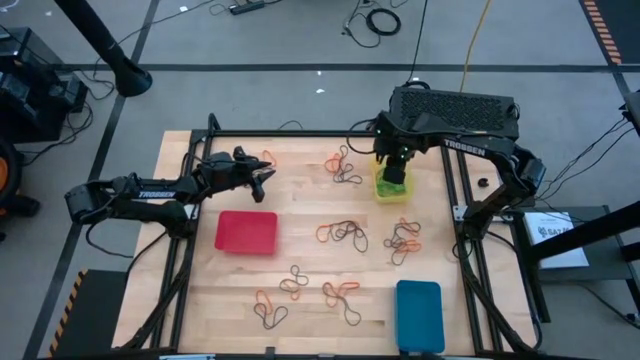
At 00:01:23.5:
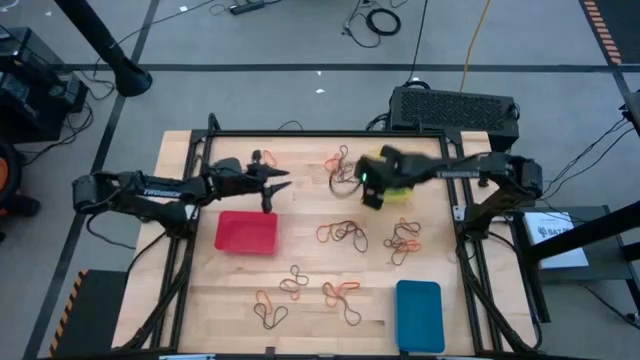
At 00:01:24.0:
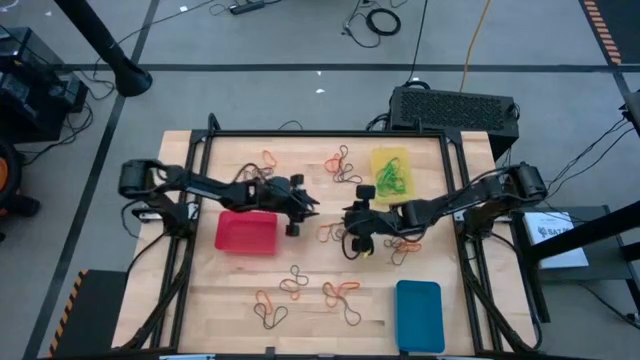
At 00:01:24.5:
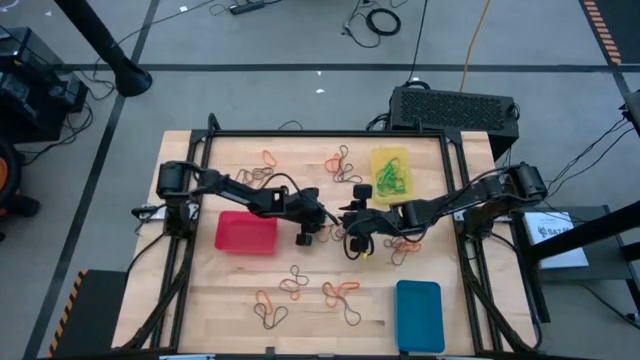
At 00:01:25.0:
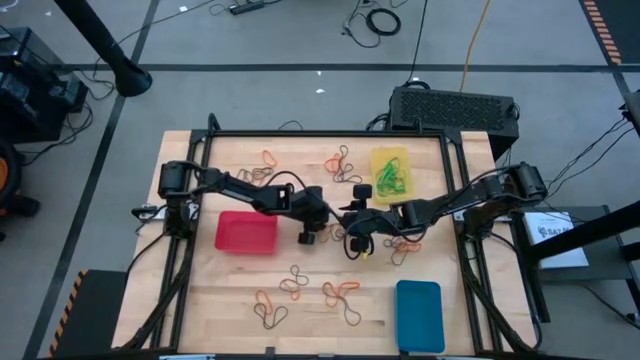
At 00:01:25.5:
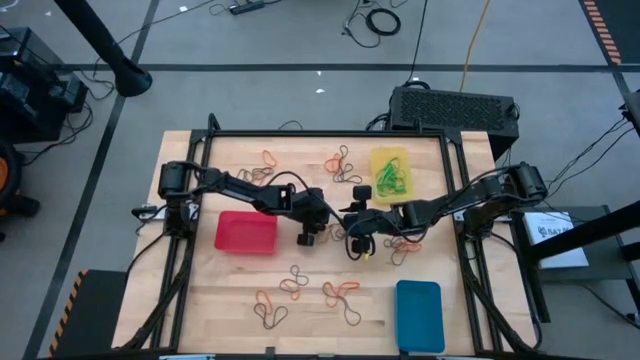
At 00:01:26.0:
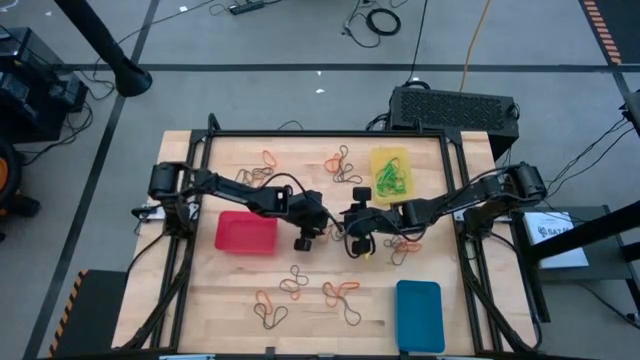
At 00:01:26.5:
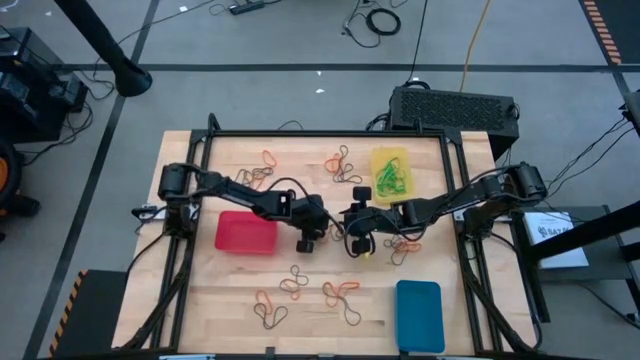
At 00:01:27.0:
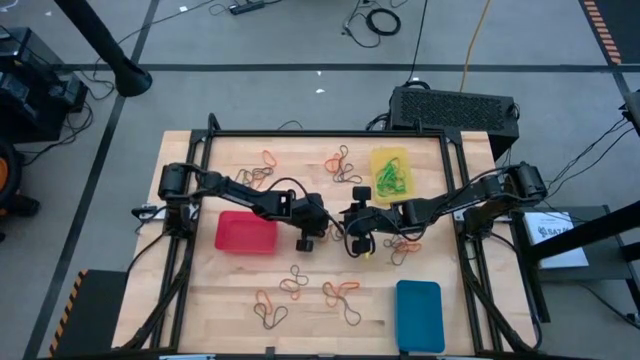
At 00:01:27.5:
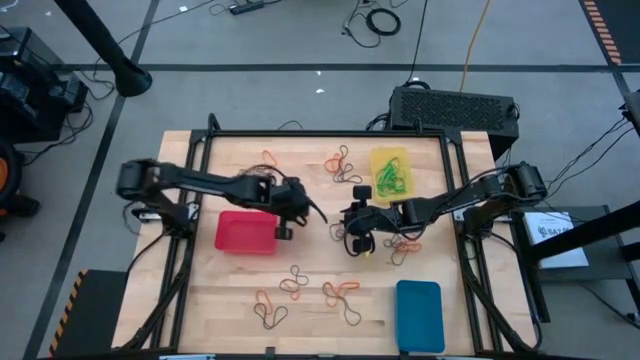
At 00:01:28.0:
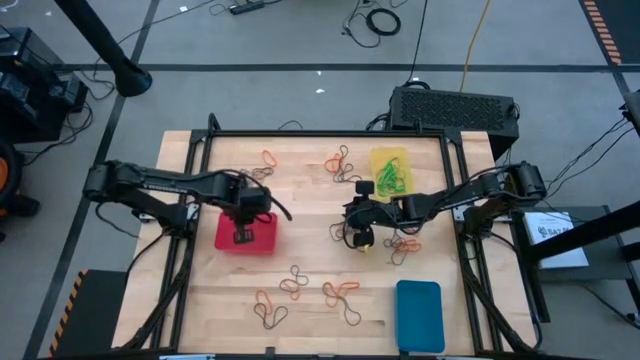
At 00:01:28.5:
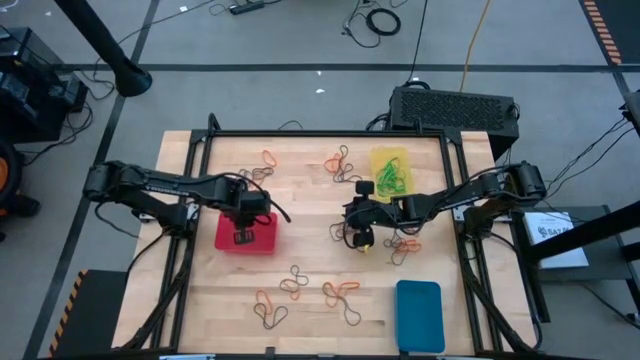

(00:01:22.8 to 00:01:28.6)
Task: Sort rubber bands into baskets
Put the orange rubber band into the pink bin

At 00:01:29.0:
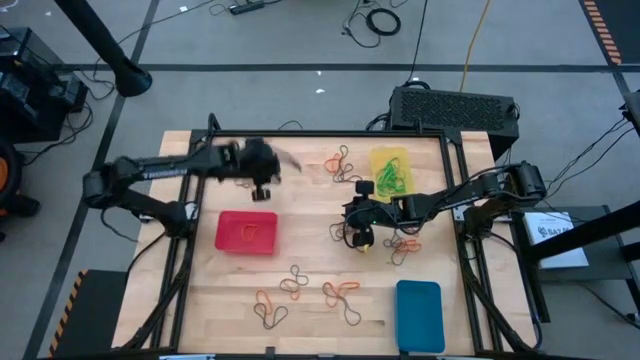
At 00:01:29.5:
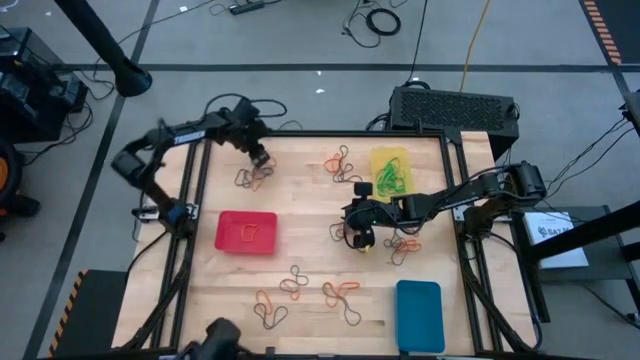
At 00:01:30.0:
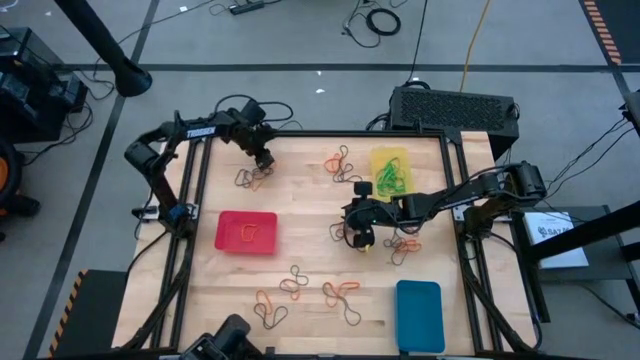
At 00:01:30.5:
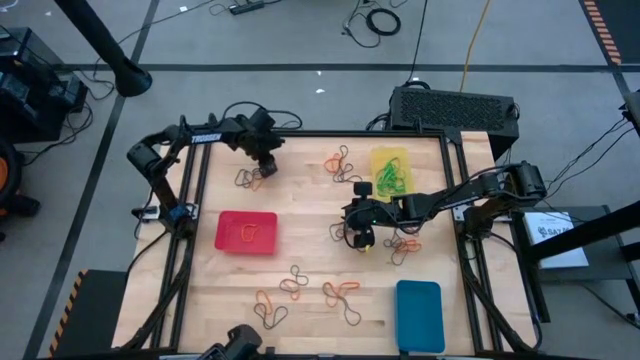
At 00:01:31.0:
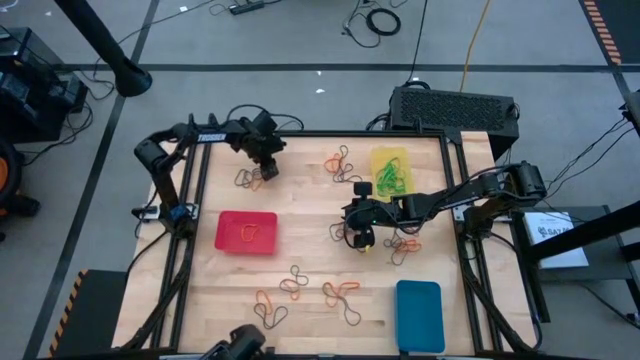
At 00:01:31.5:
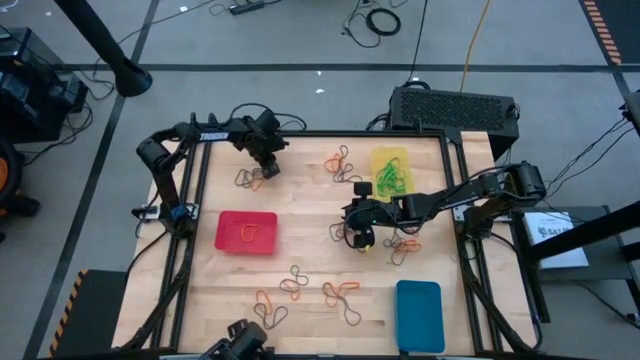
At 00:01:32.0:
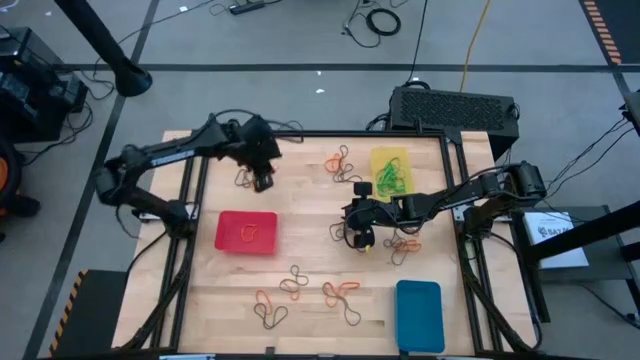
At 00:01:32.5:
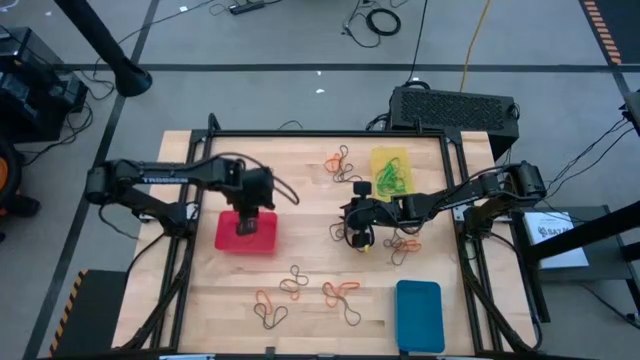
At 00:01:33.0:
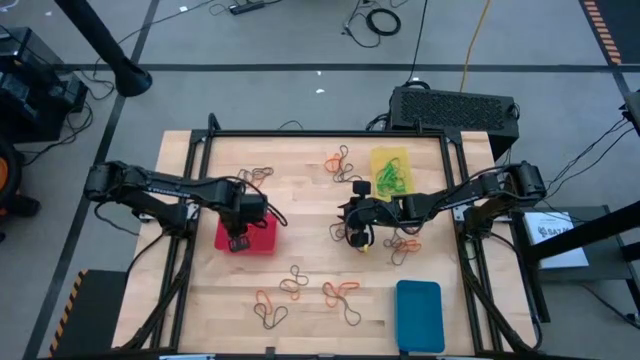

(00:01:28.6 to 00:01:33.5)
Put the orange rubber band into the pink bin

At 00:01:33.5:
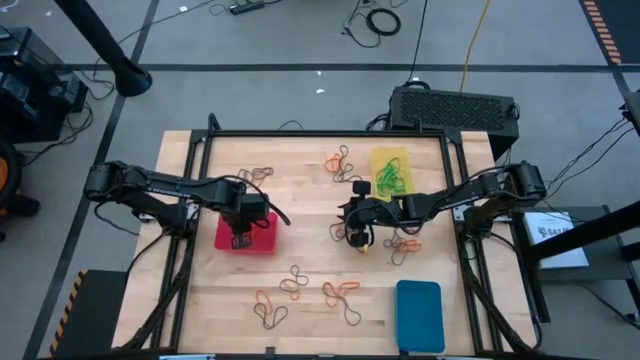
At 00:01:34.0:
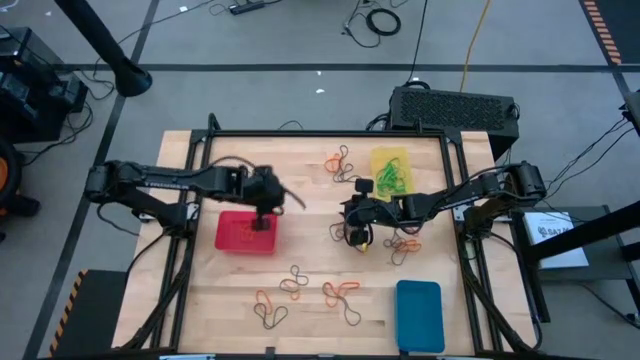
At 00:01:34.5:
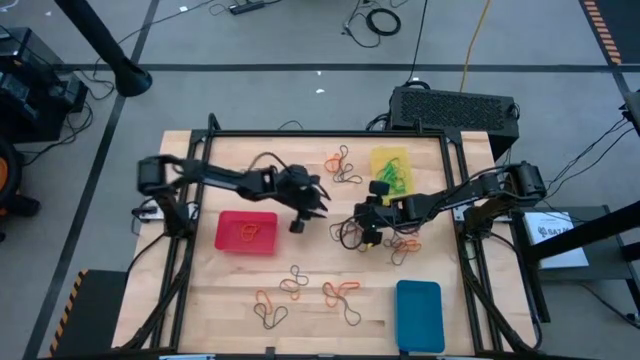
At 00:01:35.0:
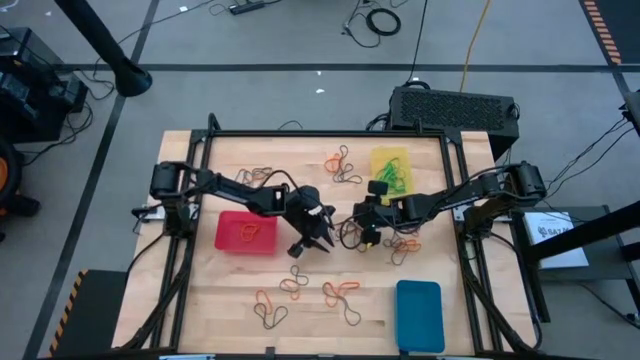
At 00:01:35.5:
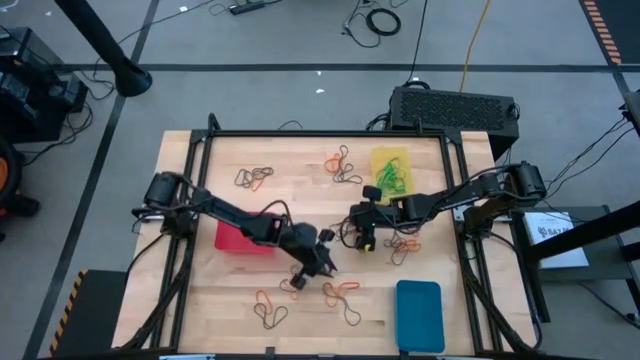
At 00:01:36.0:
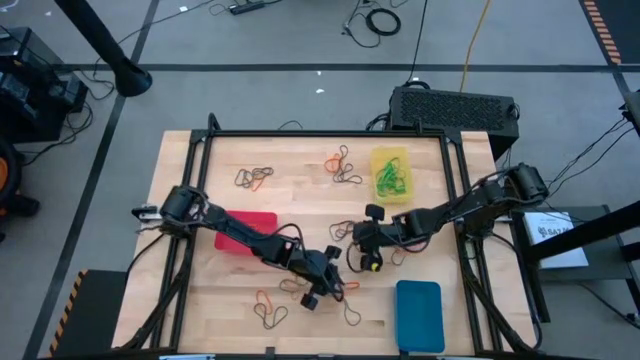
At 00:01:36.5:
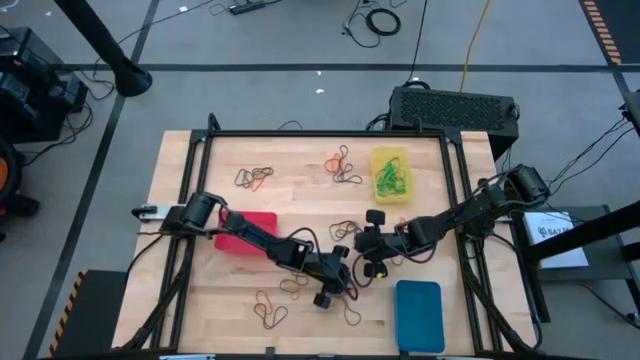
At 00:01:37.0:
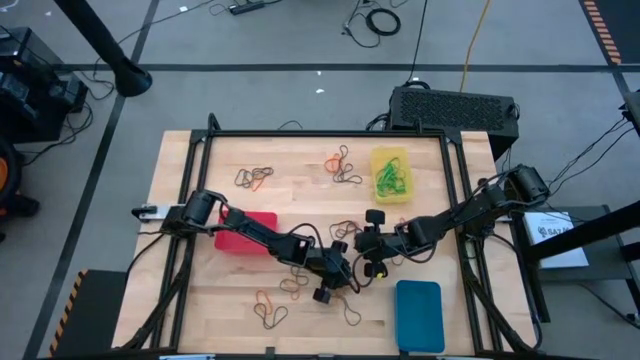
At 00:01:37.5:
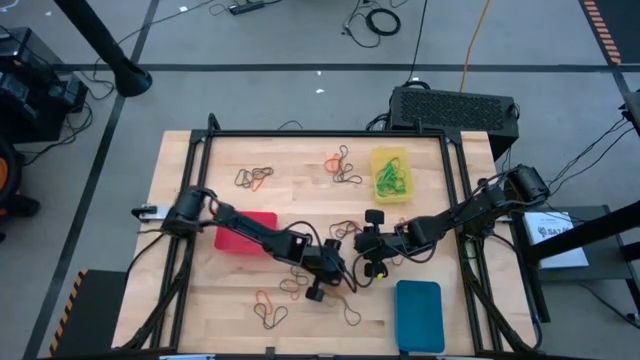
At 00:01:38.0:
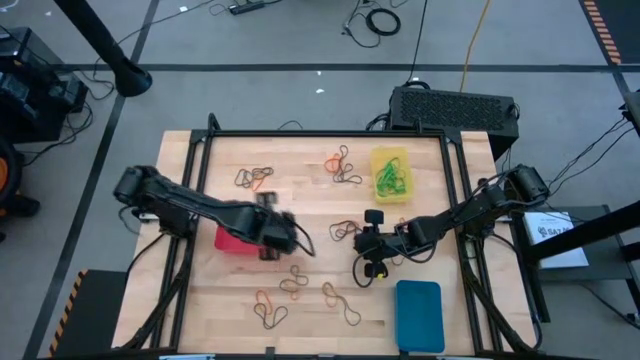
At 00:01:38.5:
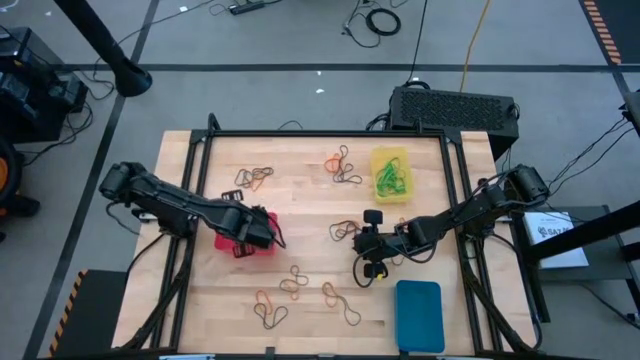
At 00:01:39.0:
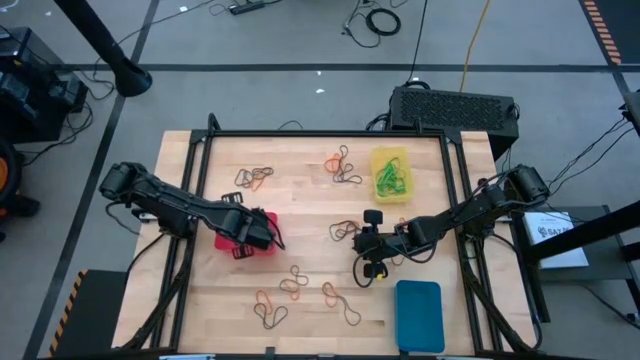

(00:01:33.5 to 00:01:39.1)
Put the orange rubber band into the pink bin

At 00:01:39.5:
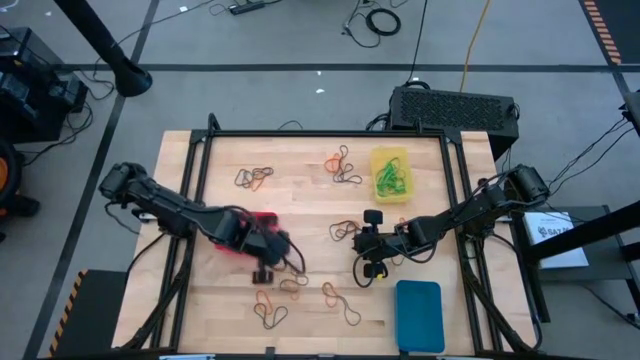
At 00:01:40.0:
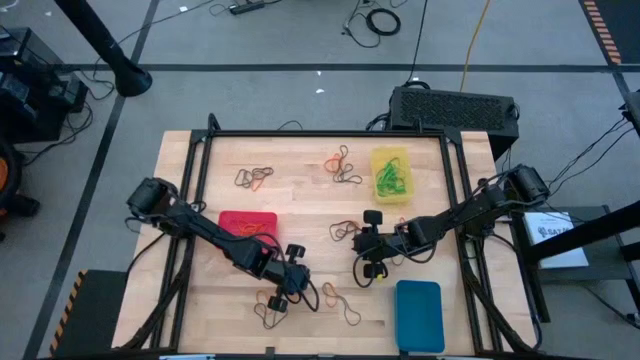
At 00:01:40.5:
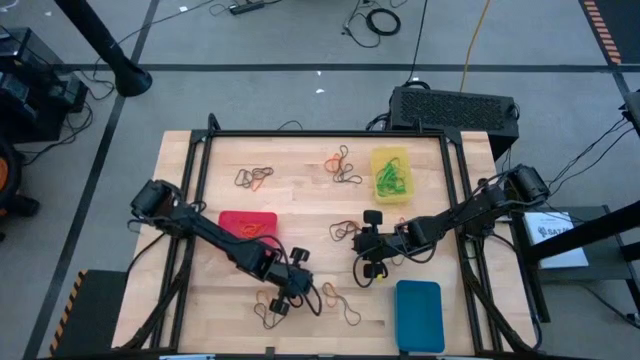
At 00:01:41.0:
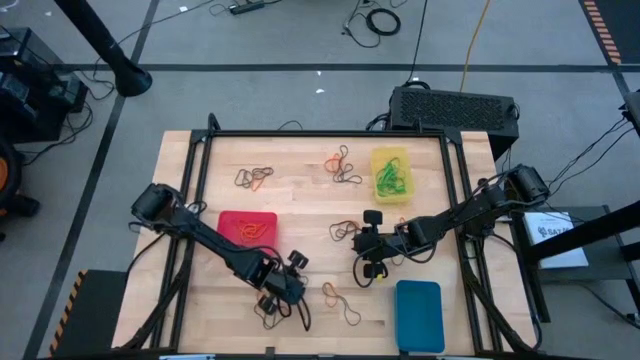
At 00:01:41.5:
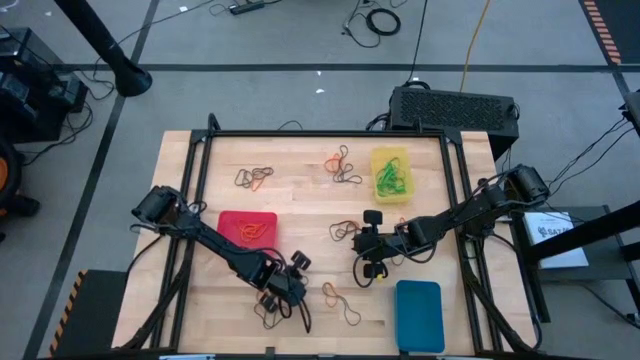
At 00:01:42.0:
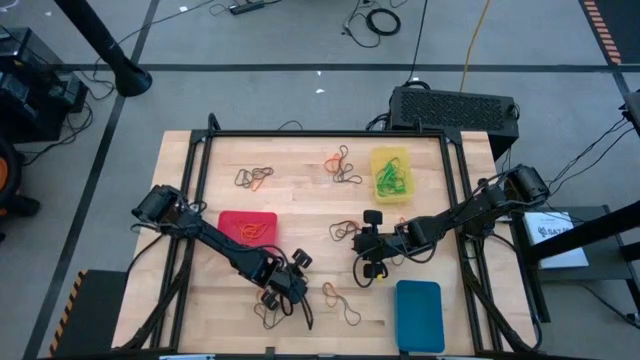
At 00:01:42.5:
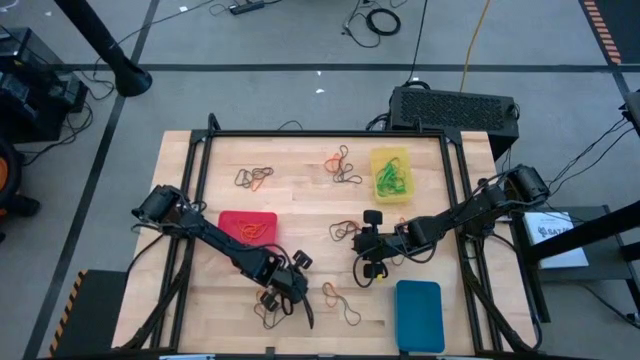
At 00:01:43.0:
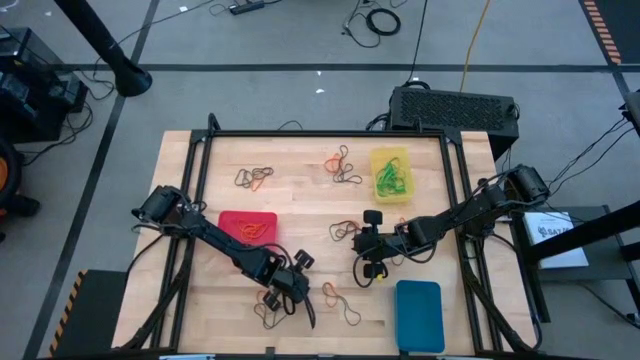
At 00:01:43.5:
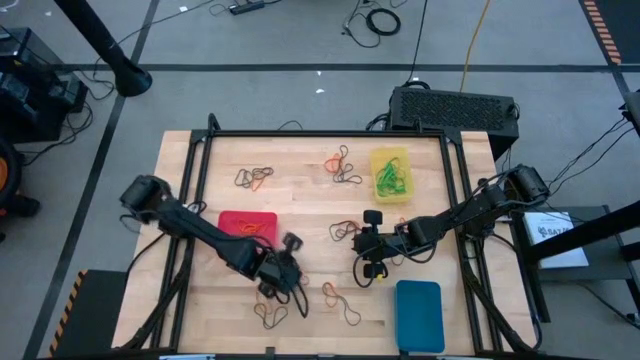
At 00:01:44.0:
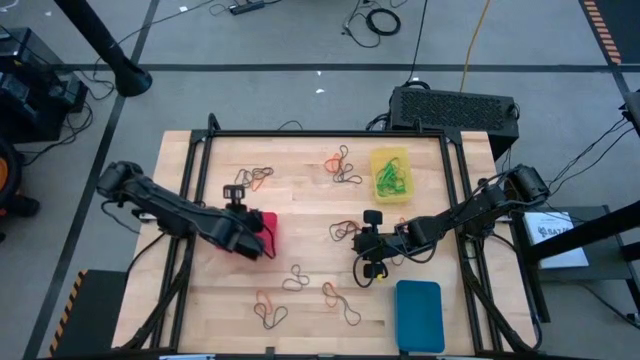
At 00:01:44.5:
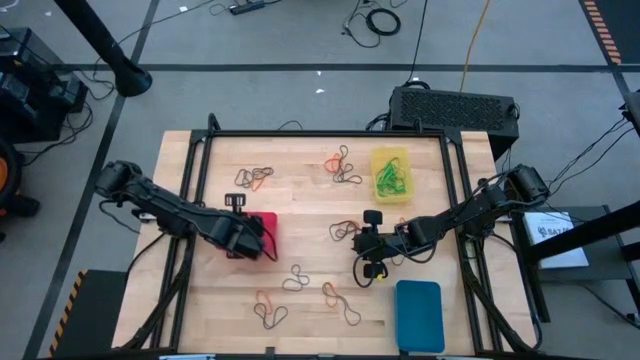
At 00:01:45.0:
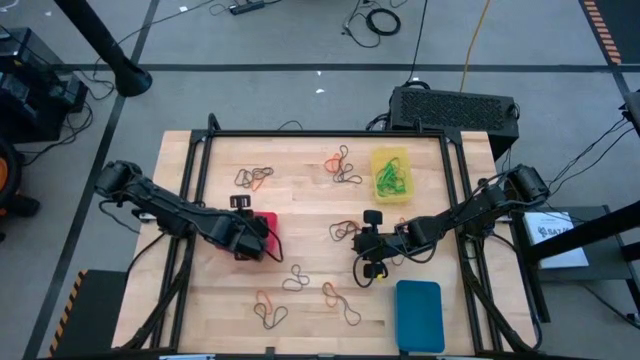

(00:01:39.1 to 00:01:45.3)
Put the orange rubber band into the pink bin
